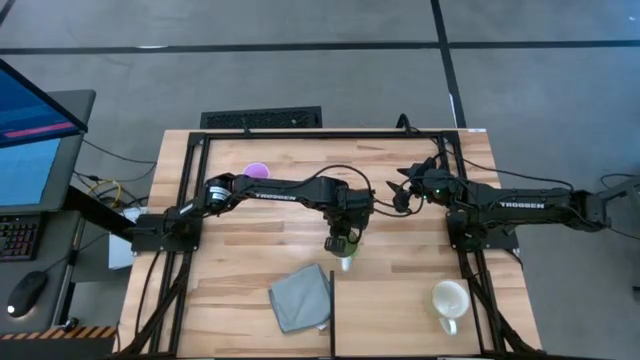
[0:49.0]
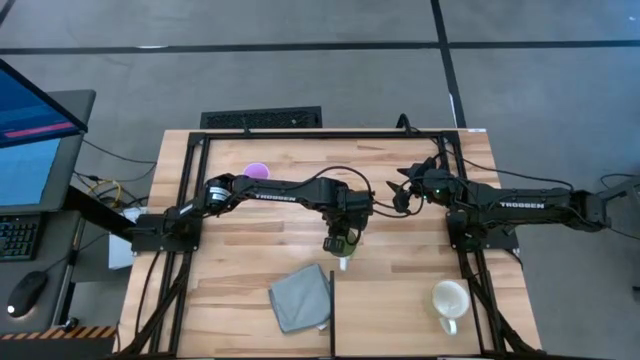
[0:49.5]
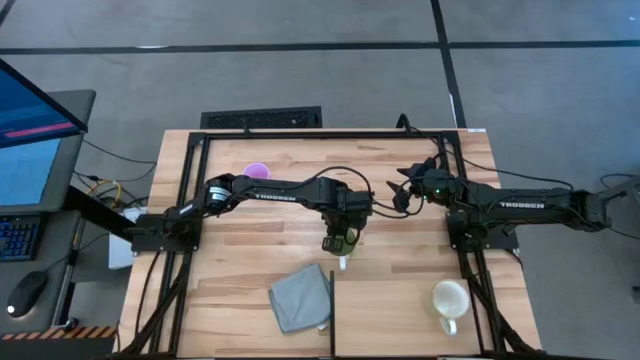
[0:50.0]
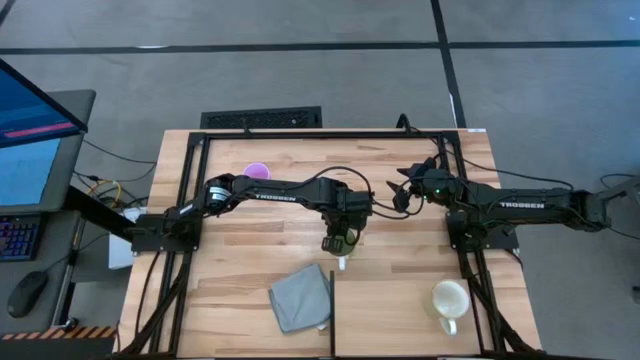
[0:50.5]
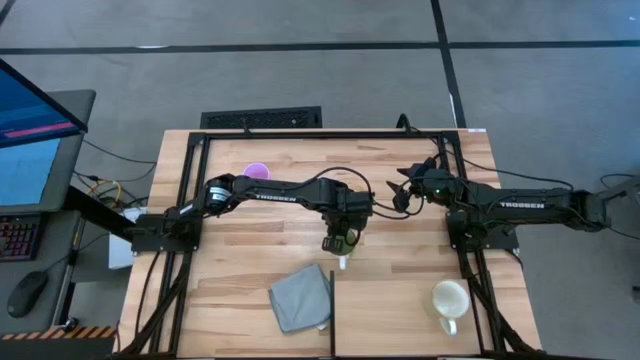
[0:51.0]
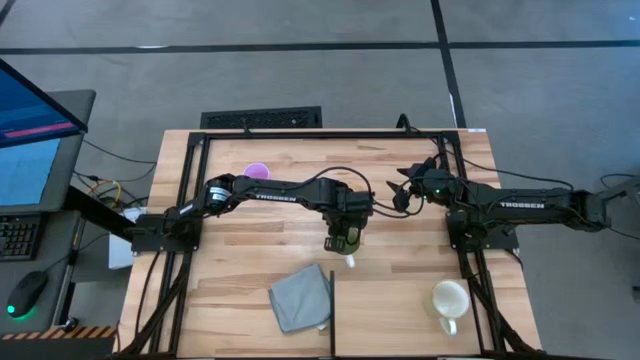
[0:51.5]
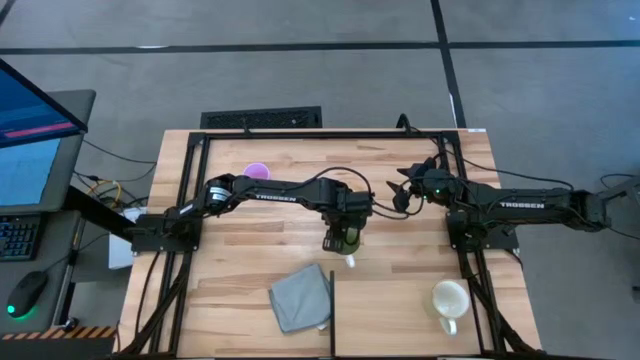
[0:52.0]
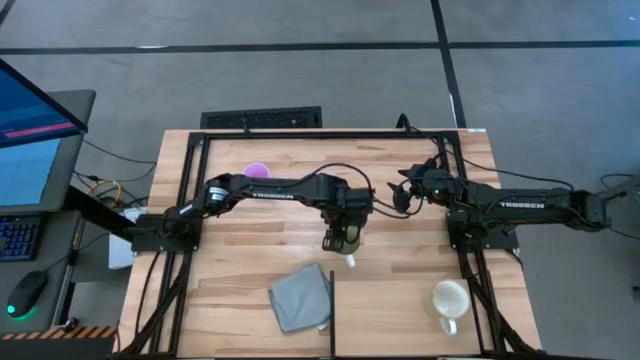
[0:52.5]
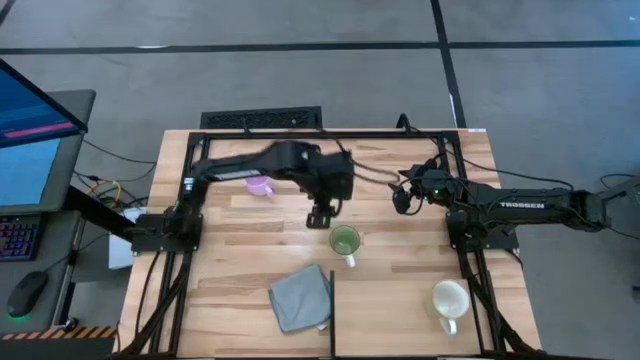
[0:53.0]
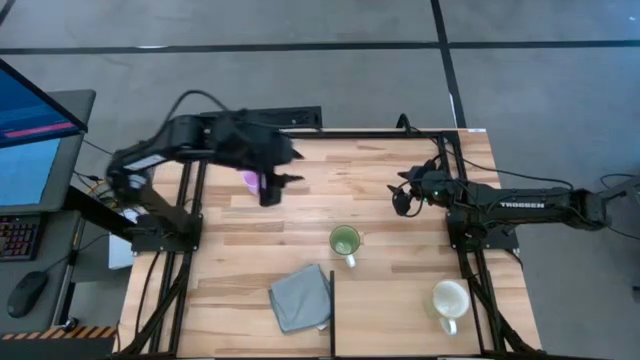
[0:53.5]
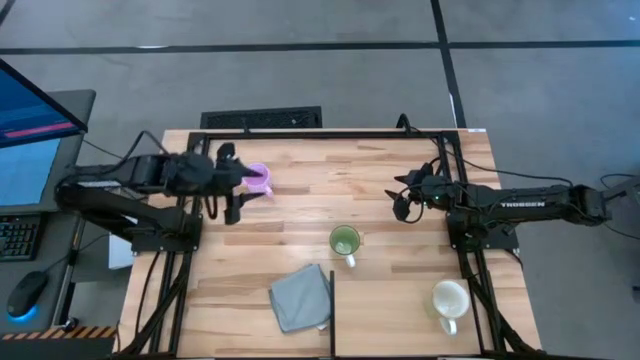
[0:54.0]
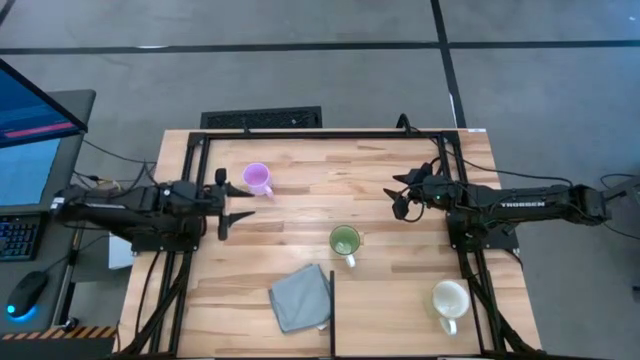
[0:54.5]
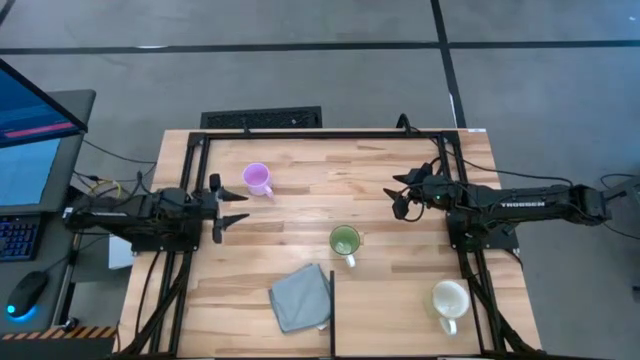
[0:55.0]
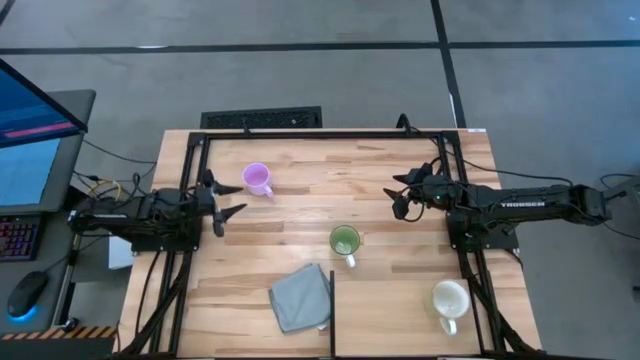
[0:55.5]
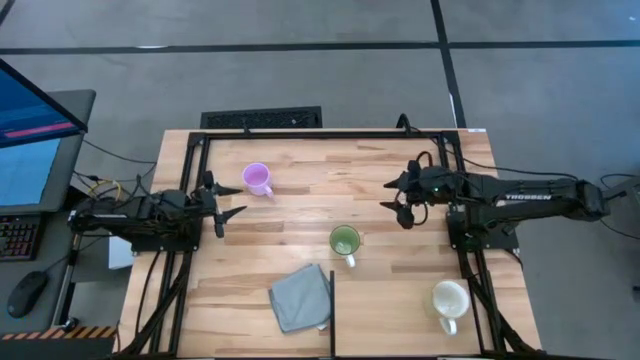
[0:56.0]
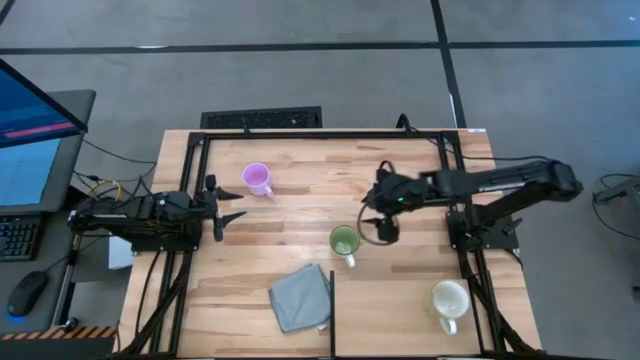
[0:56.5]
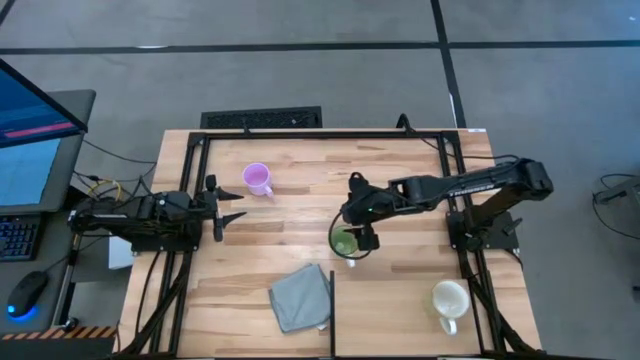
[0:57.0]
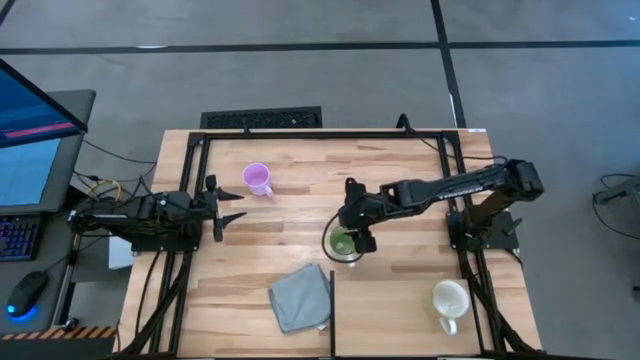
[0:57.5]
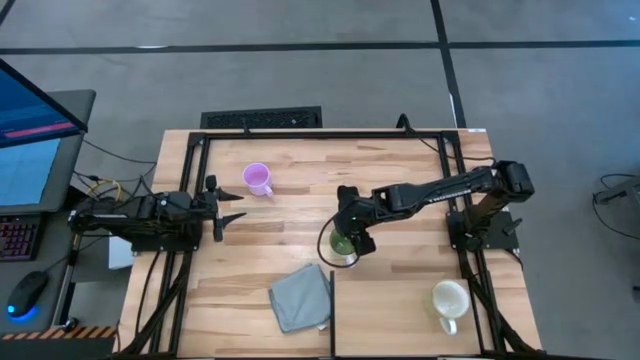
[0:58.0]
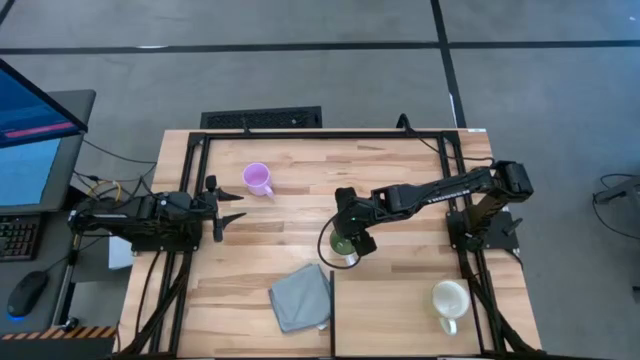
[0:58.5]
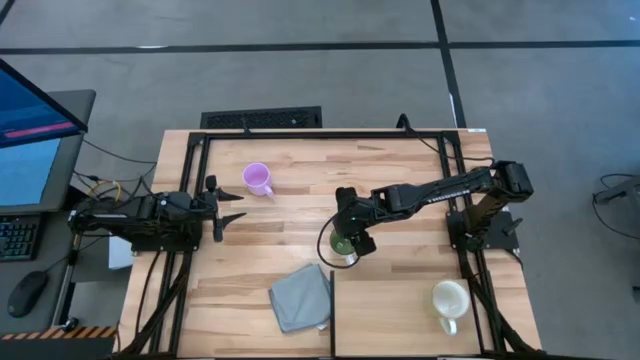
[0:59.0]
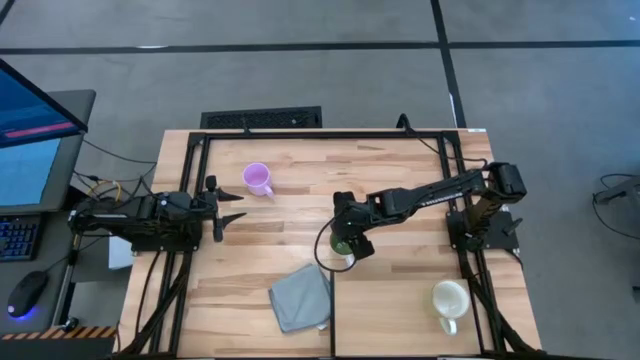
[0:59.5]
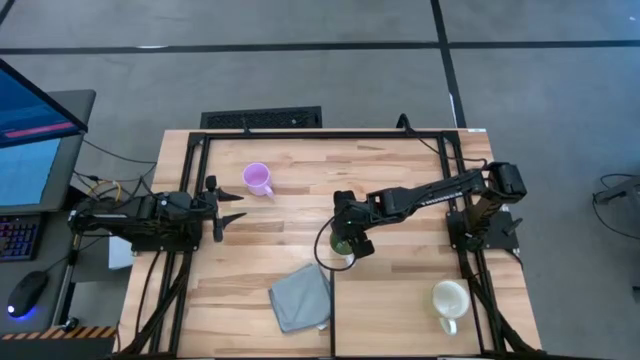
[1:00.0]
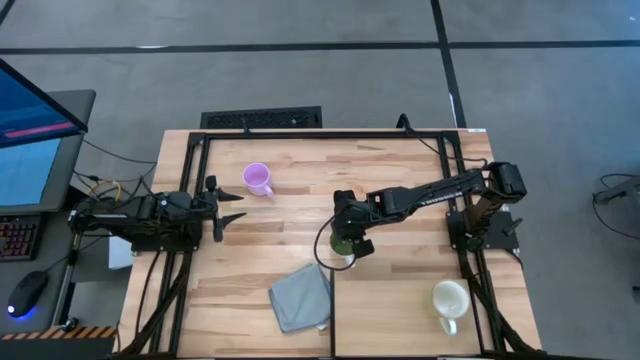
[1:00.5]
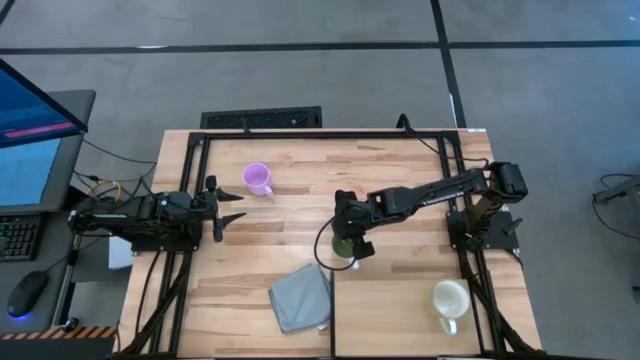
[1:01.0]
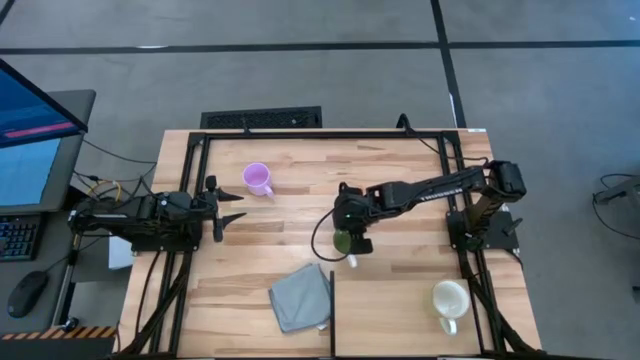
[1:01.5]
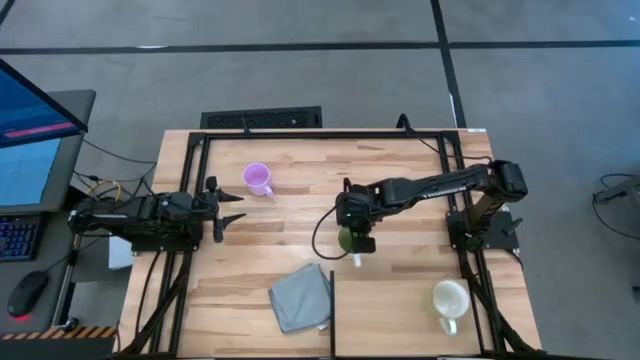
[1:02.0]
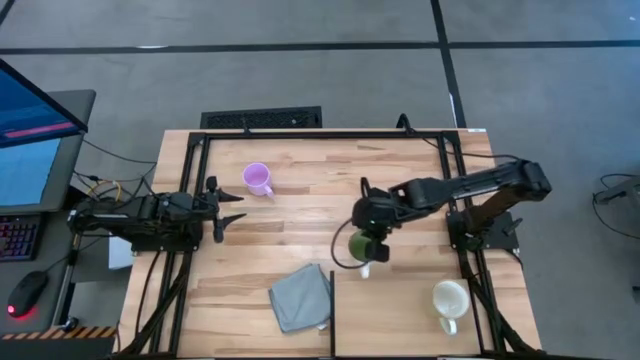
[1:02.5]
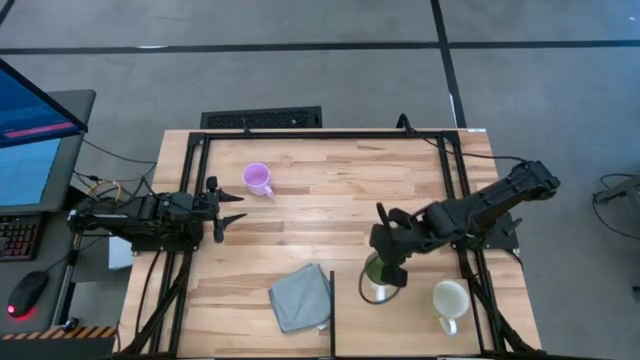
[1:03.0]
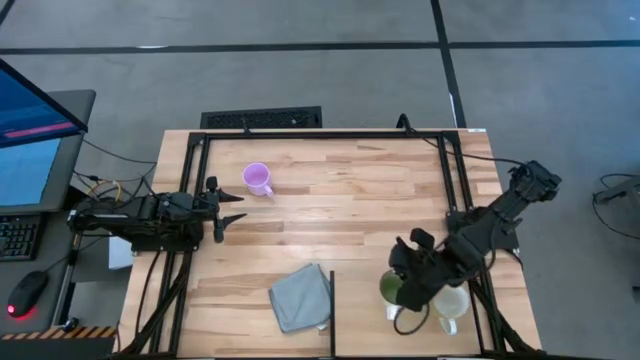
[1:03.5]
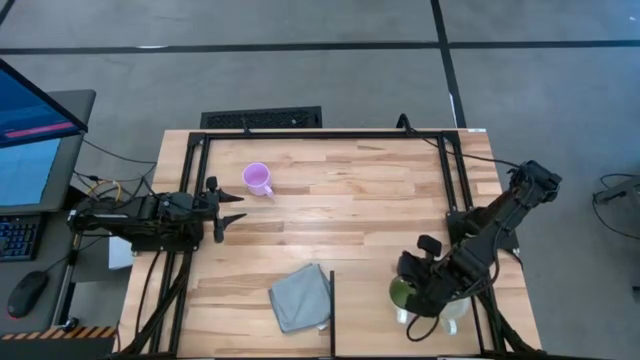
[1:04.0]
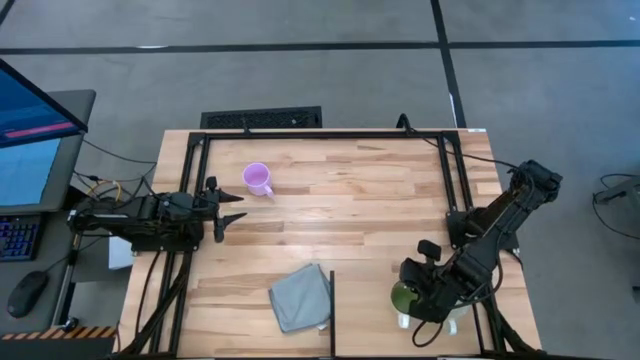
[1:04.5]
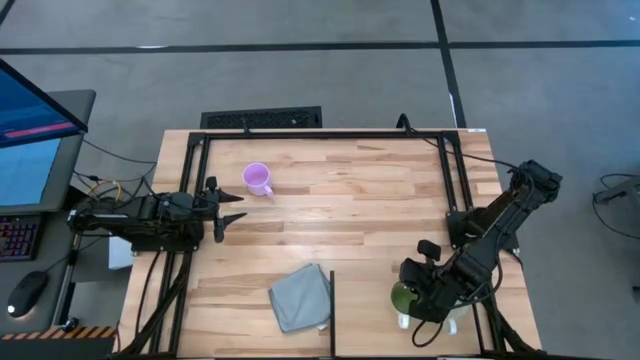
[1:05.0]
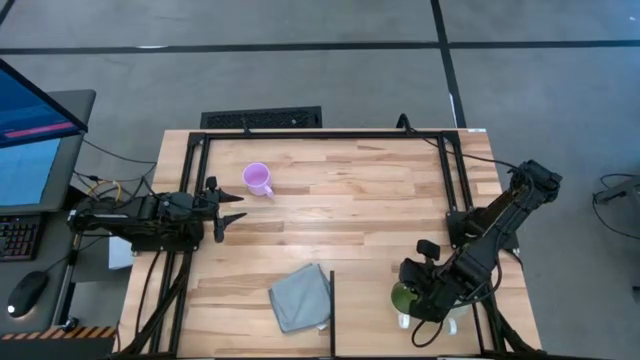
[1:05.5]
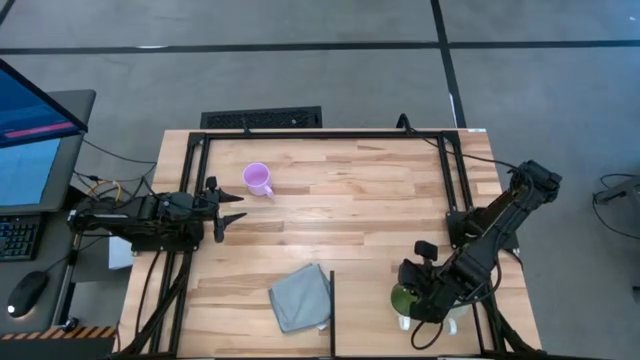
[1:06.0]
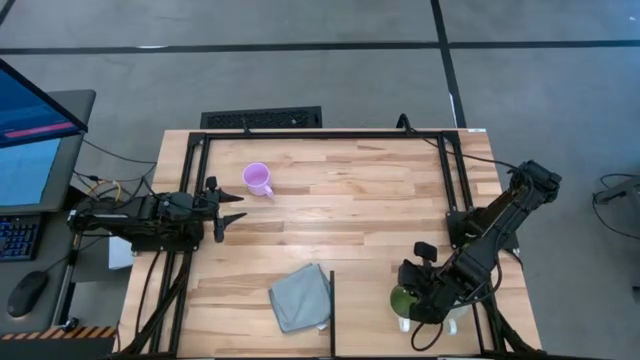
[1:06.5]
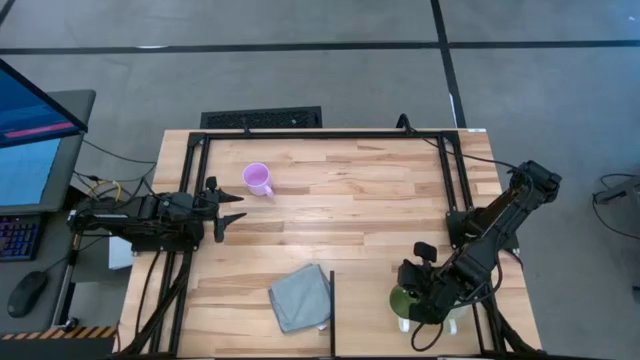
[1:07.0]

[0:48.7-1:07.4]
Task: Stack small to large cups/mugs on shelf
Put the green mug on the shelf

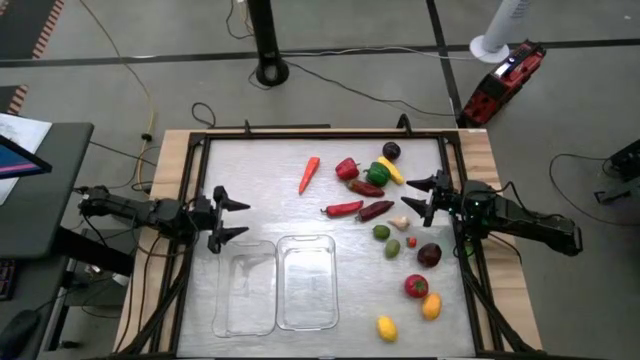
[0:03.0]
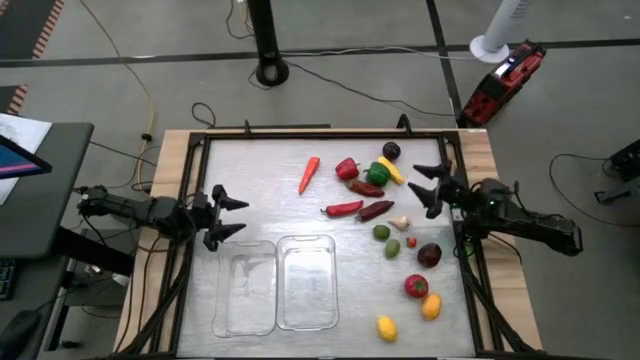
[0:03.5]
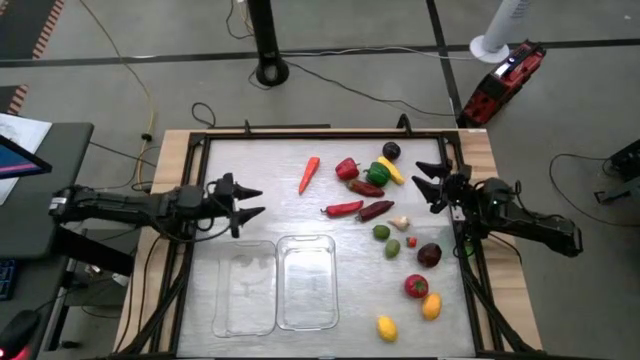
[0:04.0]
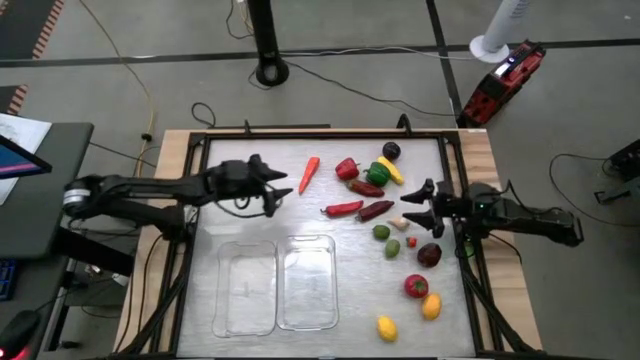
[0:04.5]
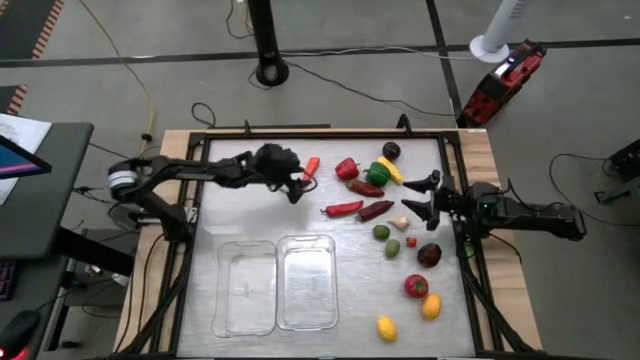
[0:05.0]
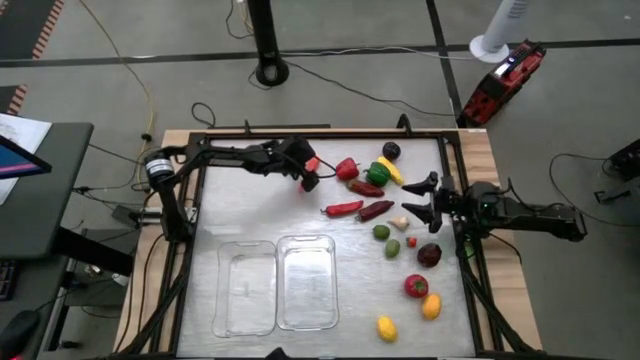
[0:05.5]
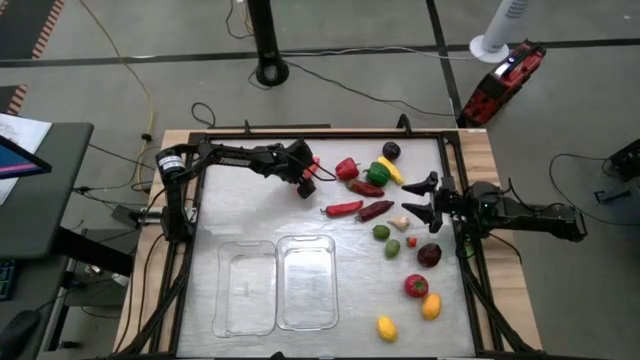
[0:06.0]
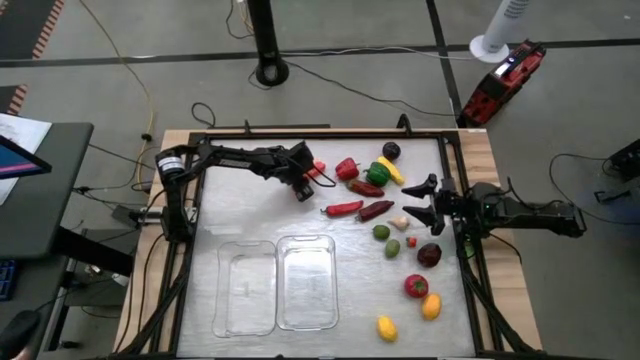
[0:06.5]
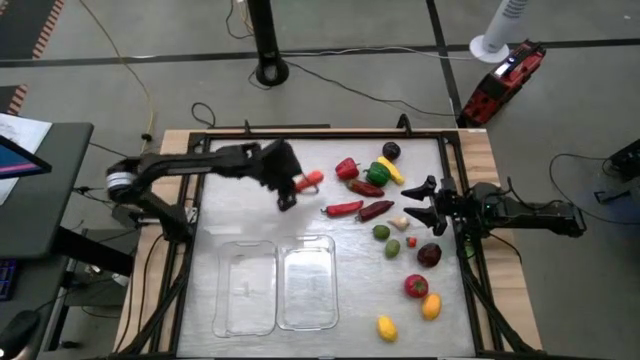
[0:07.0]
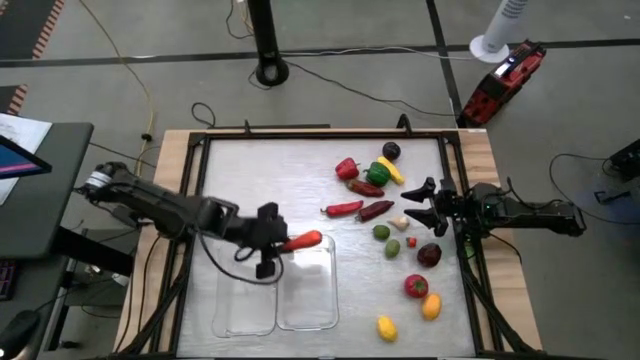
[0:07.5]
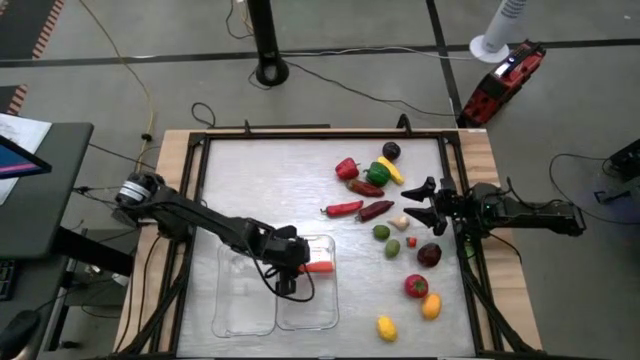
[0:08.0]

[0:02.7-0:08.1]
Task: Sort produce into baskets
Put the orange carrot into the right transparent bin
